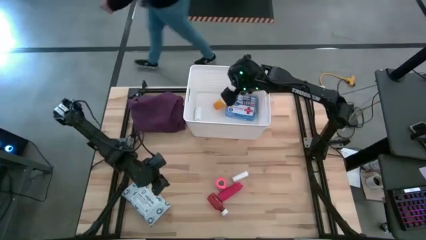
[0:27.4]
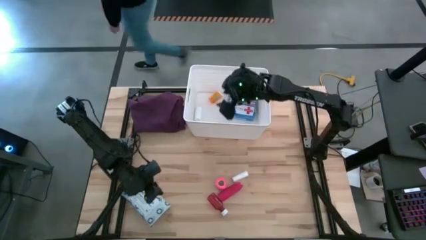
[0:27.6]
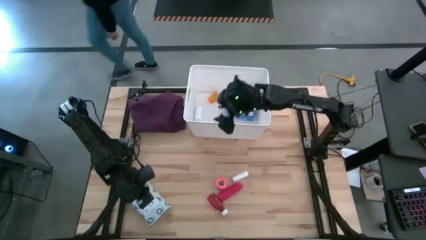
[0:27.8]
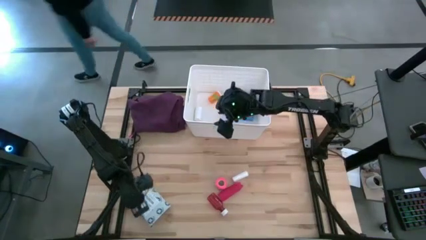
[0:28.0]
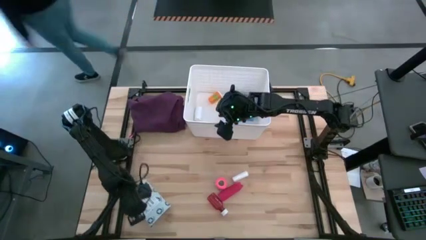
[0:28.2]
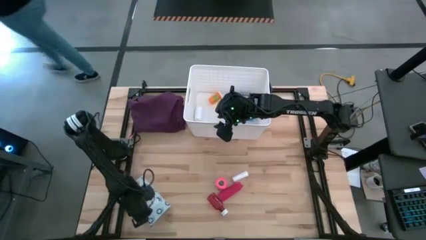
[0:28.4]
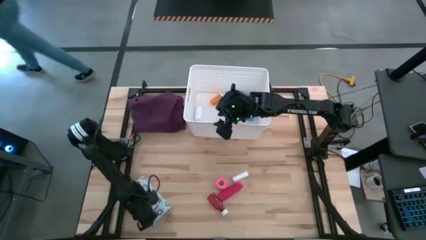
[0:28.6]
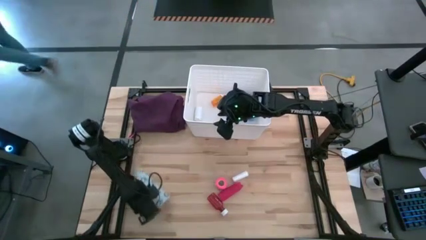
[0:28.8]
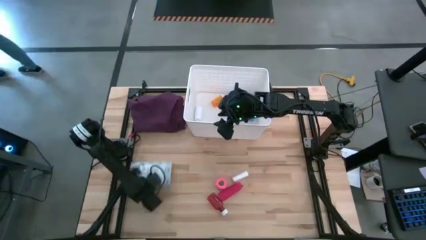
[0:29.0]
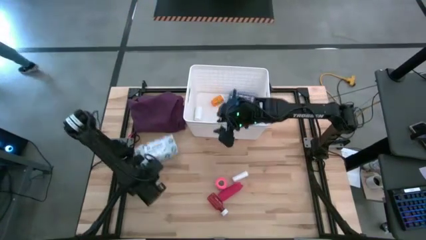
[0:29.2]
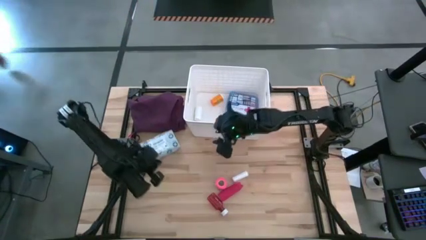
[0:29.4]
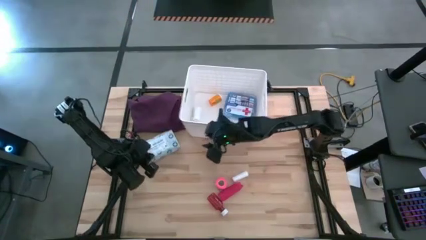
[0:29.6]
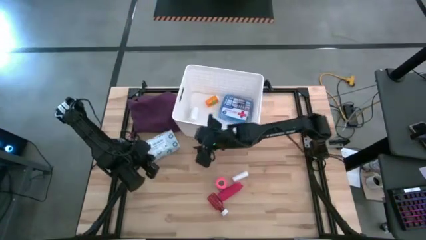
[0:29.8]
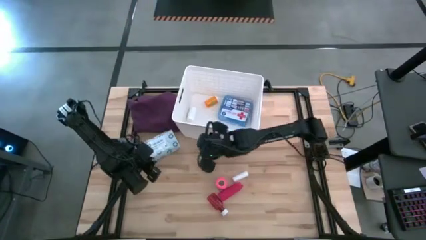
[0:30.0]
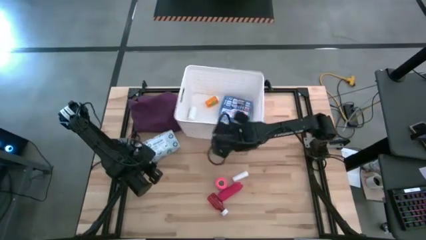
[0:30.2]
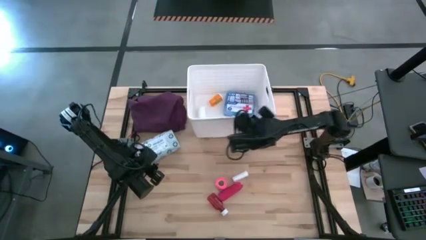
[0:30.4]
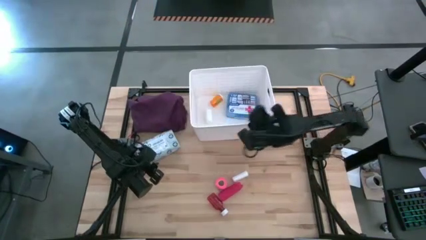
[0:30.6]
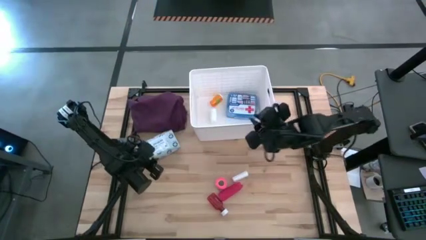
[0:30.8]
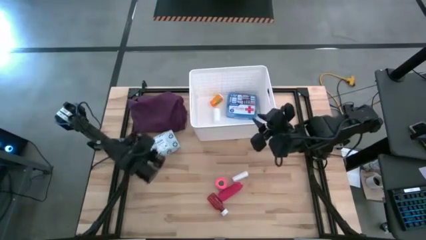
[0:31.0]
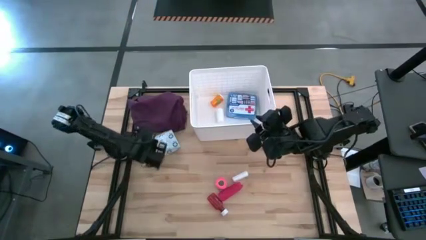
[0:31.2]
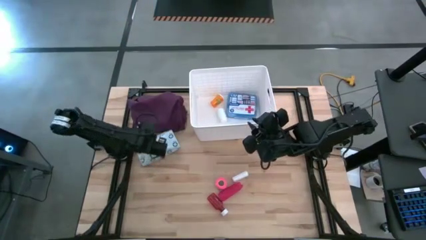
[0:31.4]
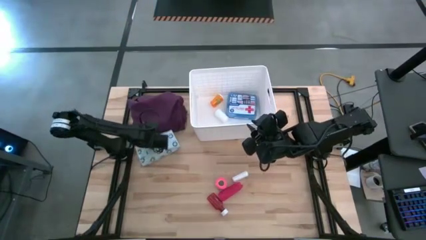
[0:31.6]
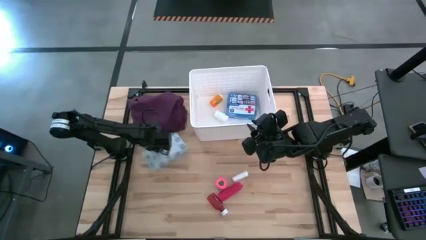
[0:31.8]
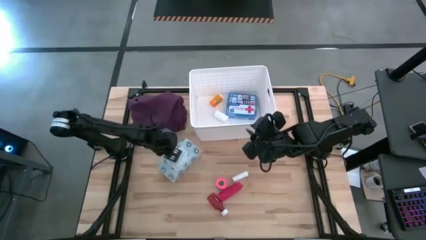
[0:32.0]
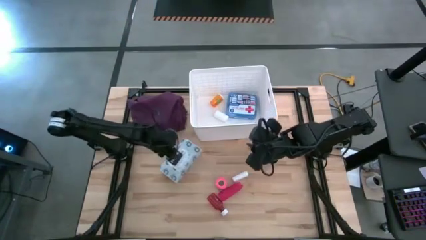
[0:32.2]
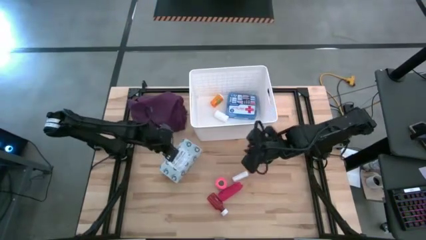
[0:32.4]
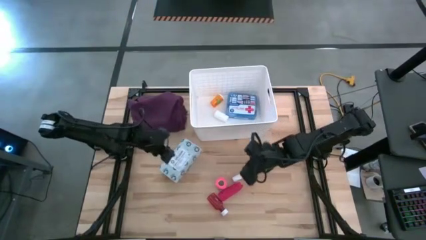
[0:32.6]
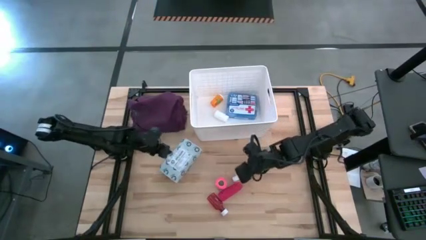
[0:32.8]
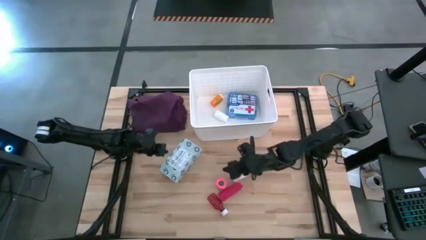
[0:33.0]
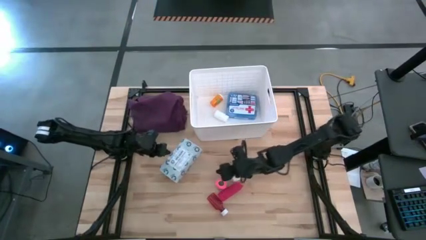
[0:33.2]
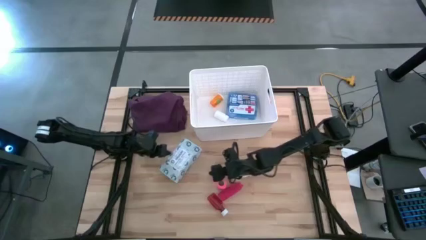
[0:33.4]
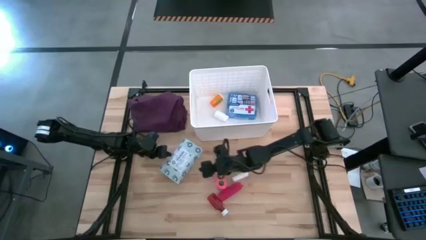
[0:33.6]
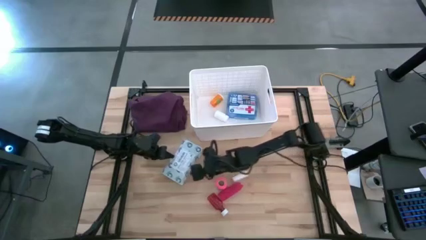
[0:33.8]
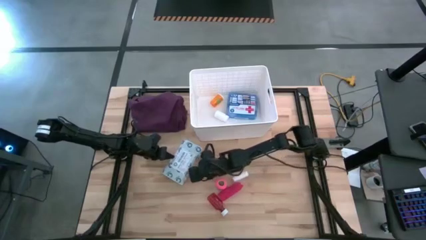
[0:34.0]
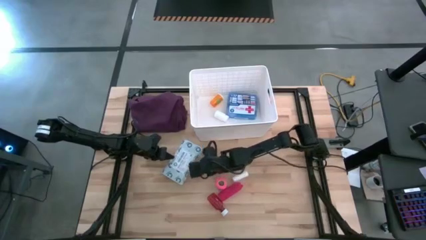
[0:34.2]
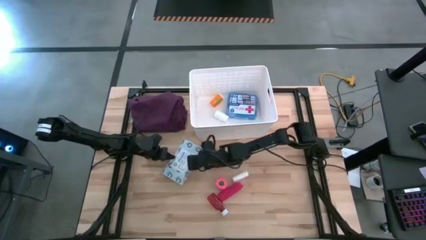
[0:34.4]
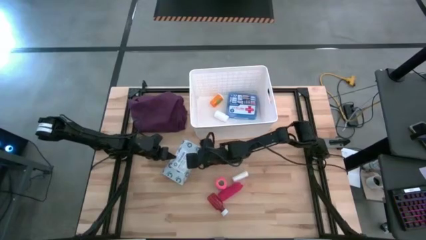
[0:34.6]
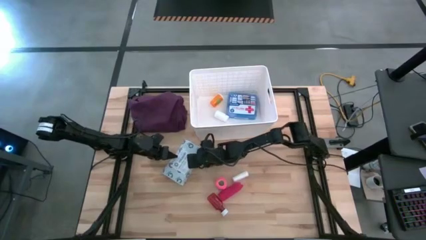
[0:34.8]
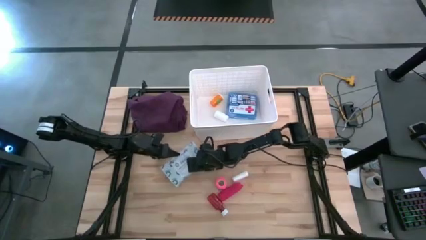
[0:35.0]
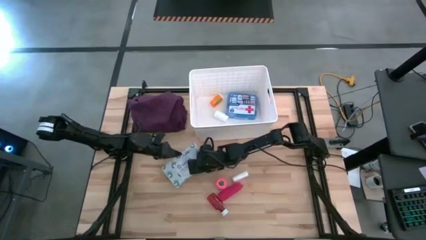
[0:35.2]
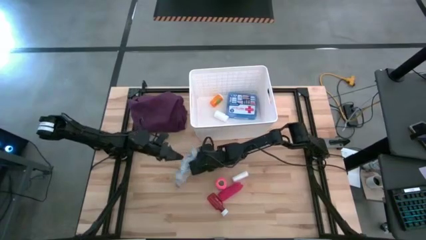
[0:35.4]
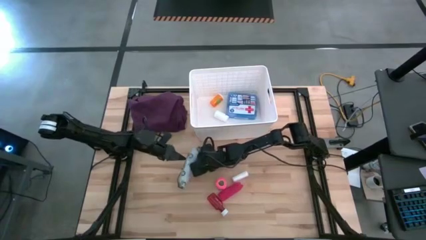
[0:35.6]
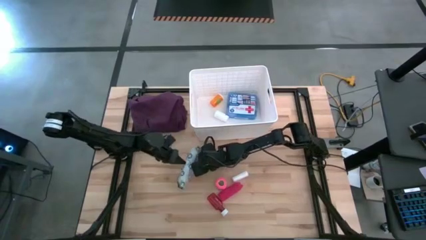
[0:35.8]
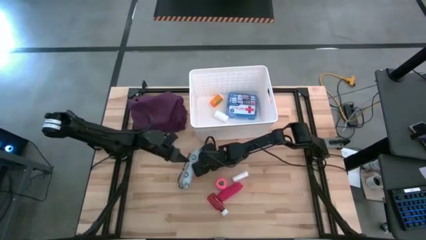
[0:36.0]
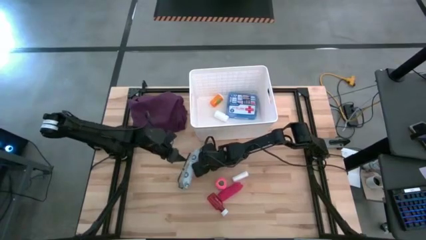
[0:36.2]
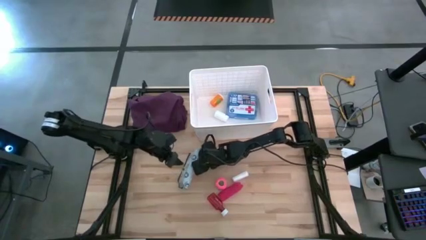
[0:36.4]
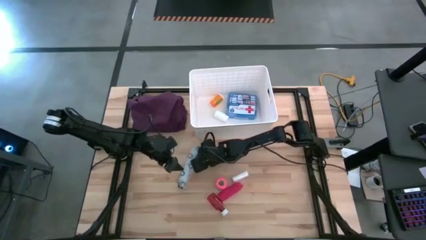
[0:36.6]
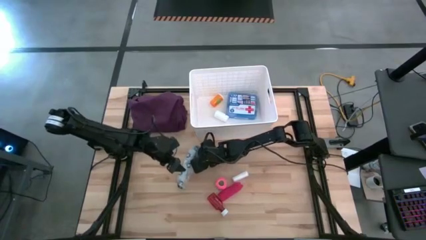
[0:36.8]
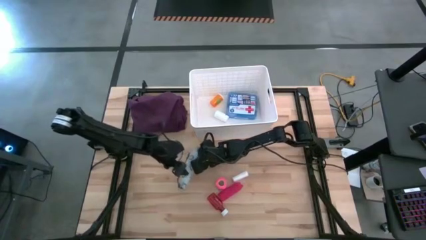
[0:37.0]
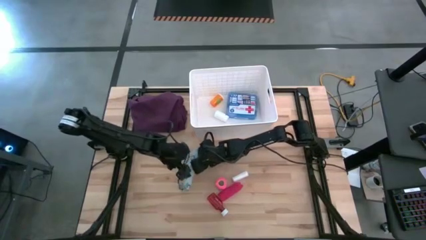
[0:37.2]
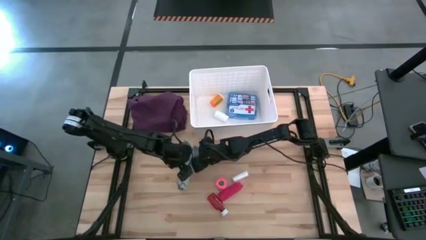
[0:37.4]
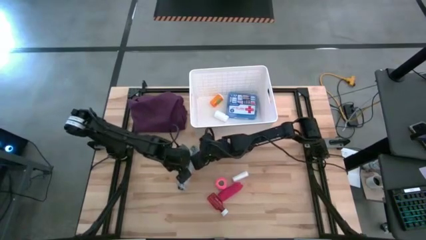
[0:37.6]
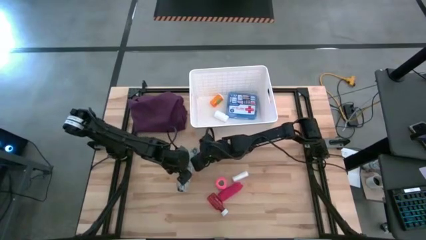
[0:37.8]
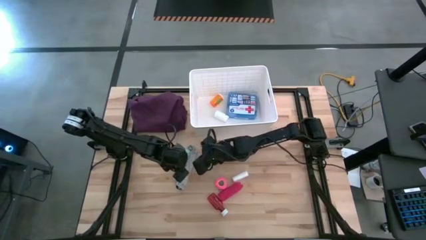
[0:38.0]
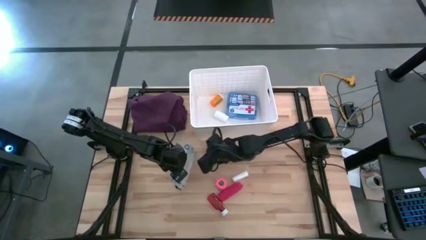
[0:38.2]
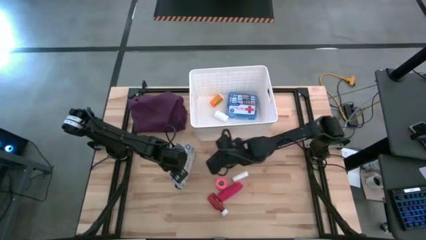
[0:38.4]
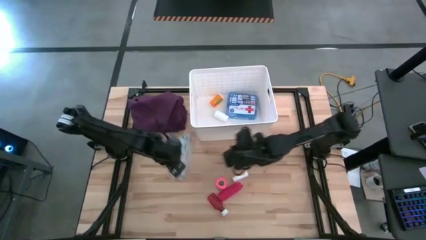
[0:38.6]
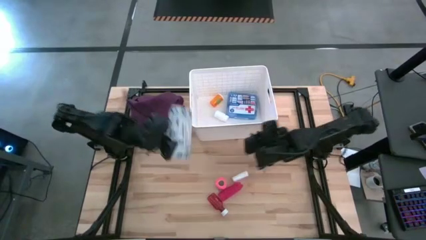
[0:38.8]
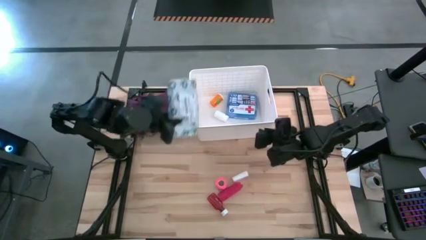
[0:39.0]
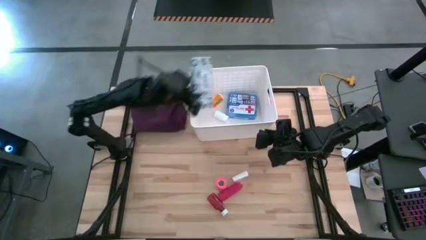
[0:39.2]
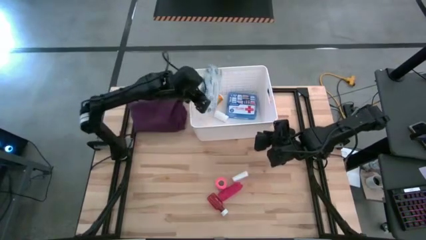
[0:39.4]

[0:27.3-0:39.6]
Task: Pick & place medical supplies in basket/bin
Put the white mailer bag into the white bin

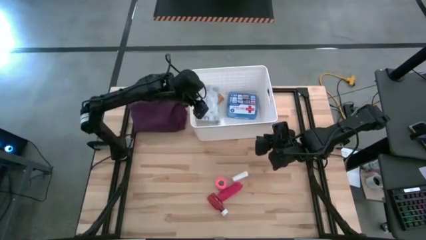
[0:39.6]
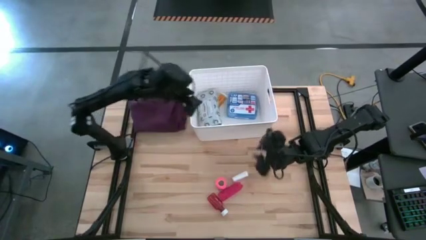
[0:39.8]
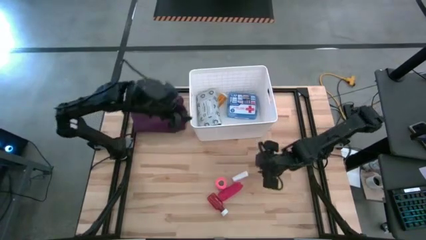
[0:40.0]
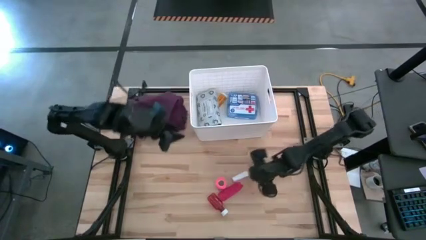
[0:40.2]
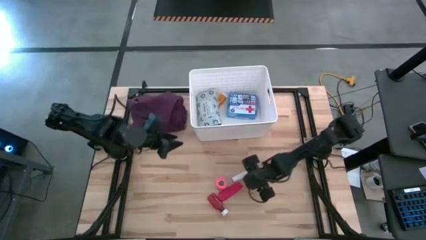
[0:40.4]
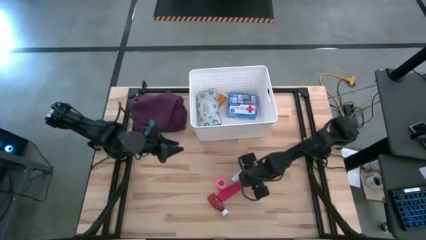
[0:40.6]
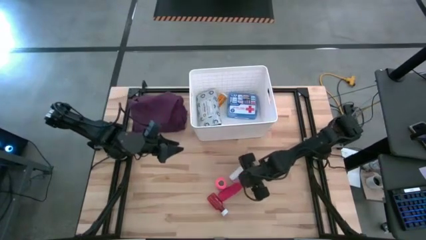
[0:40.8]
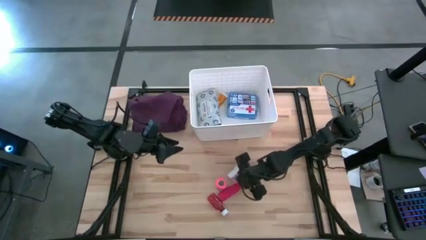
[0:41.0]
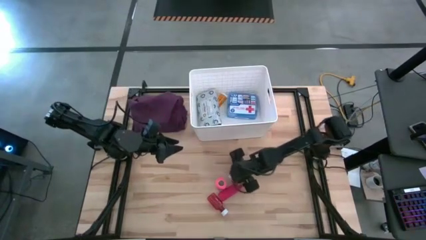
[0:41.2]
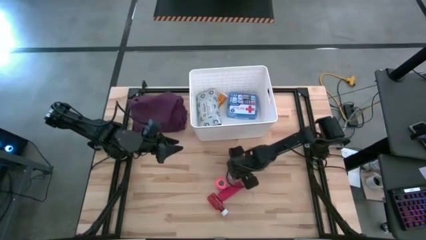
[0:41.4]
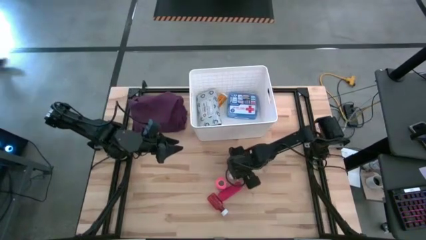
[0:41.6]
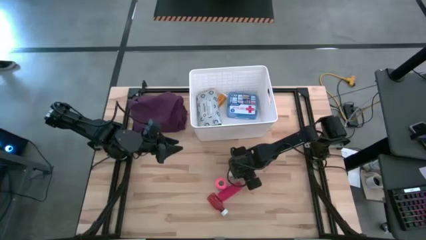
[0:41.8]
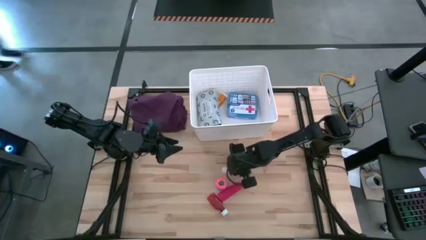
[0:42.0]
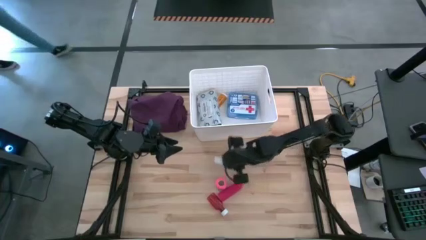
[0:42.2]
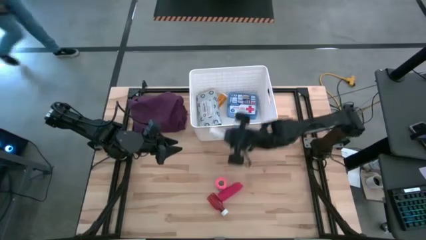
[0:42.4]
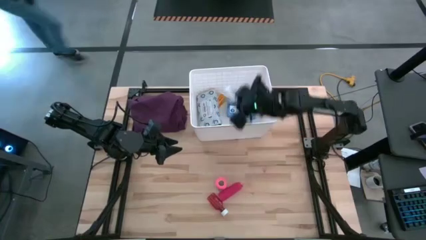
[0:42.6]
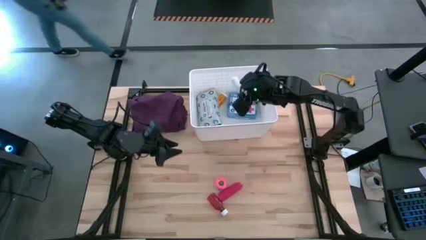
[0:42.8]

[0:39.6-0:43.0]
Put the white gauze into the white bin

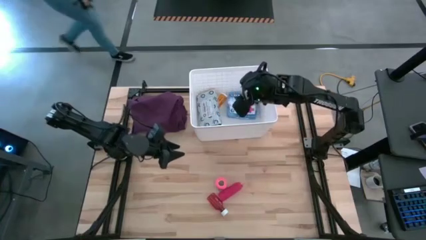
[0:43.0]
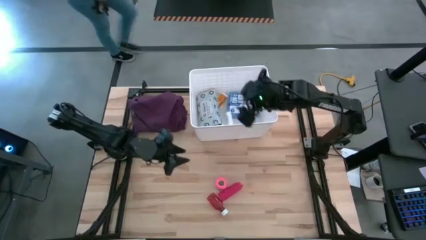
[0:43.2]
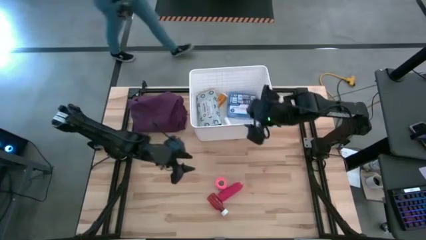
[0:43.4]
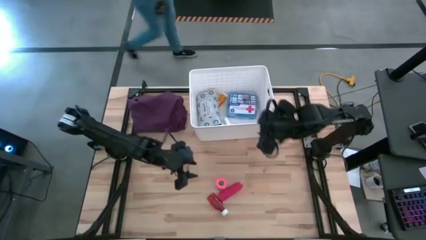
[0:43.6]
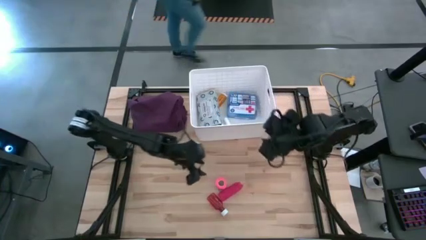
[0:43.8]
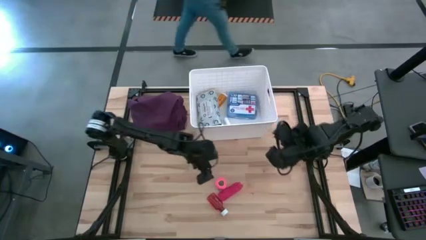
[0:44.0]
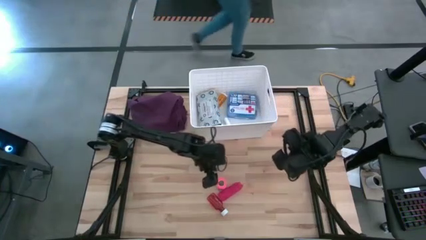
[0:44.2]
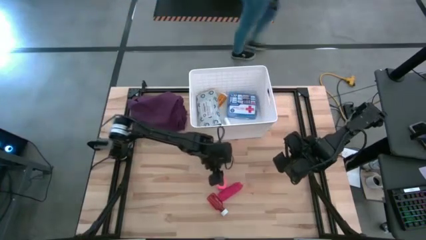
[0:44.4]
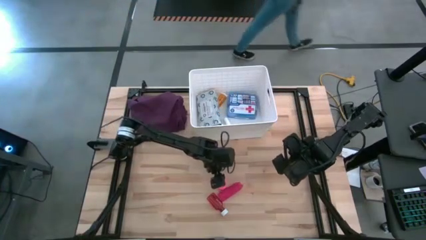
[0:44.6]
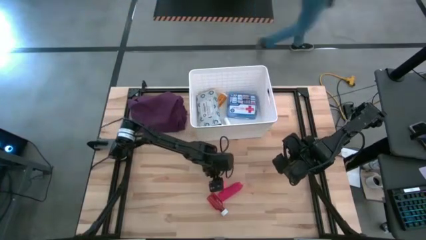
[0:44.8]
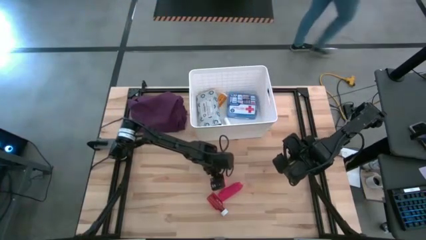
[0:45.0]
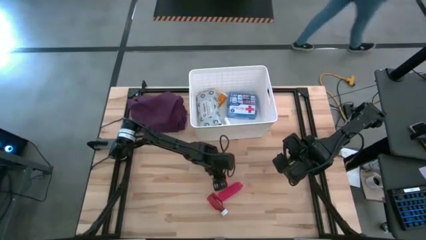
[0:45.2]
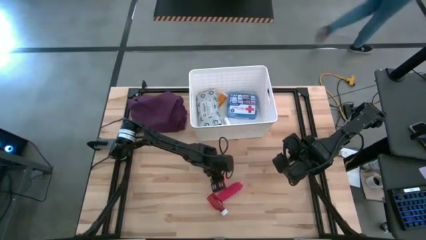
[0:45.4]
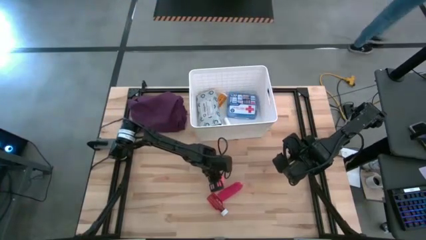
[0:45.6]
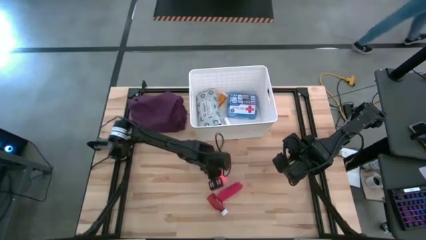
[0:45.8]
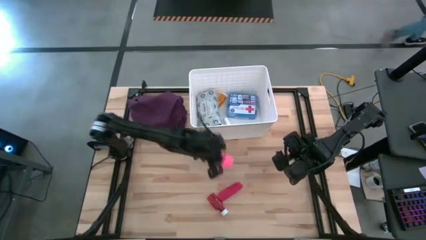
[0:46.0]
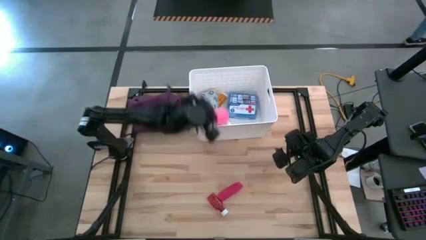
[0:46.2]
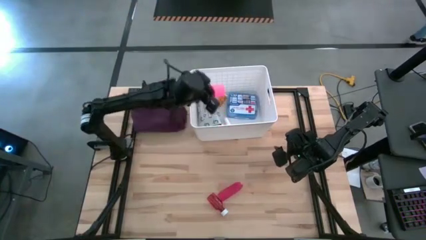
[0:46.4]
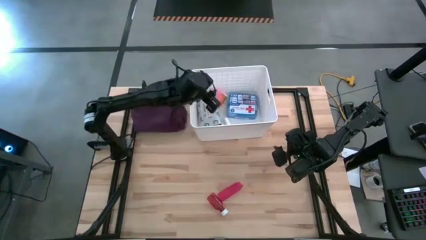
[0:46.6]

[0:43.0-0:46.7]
Put the pink bandage into the white bin
